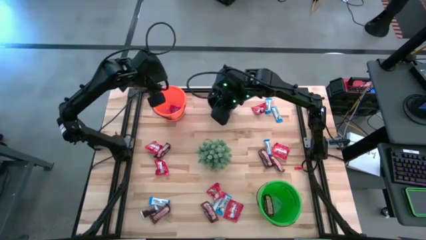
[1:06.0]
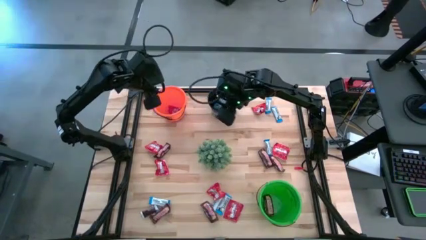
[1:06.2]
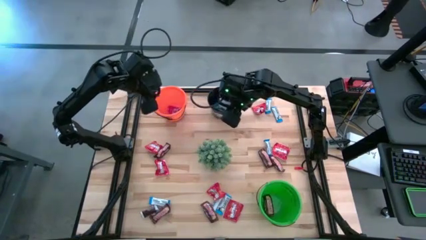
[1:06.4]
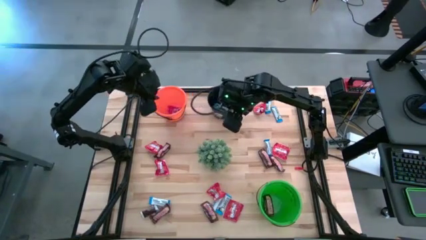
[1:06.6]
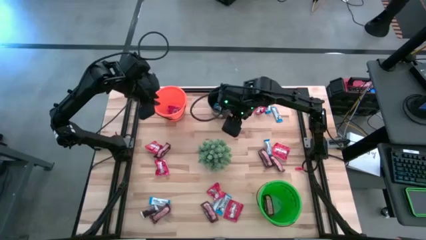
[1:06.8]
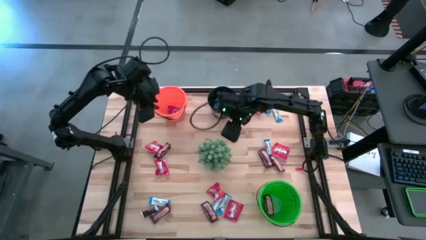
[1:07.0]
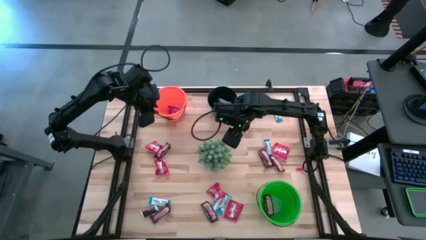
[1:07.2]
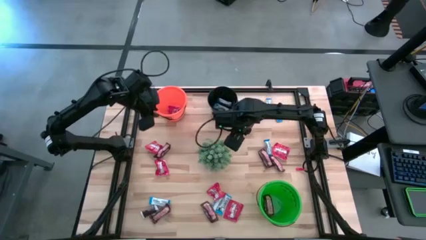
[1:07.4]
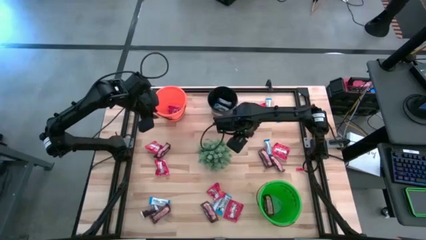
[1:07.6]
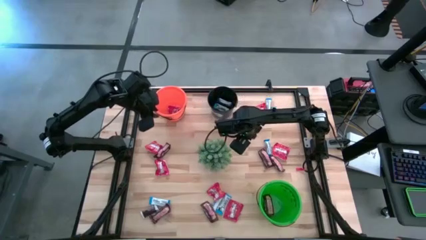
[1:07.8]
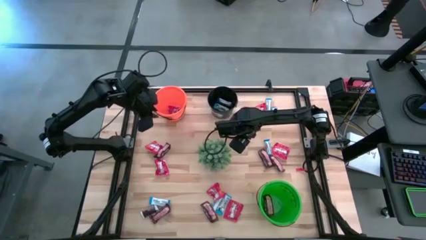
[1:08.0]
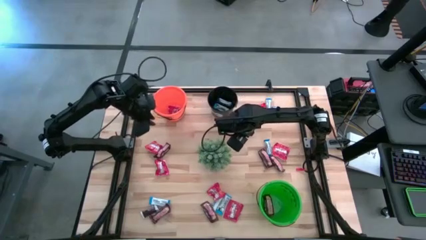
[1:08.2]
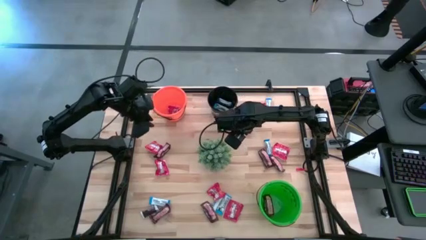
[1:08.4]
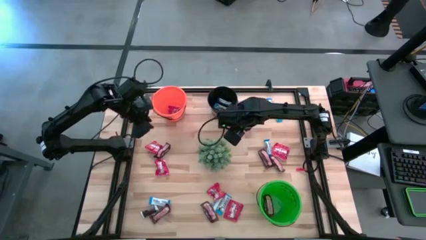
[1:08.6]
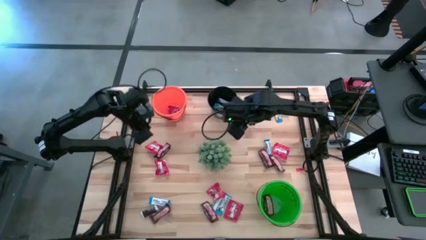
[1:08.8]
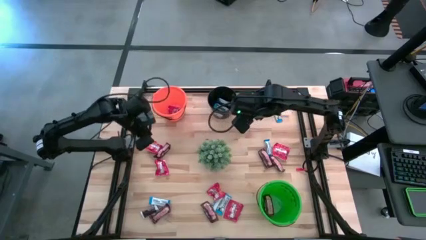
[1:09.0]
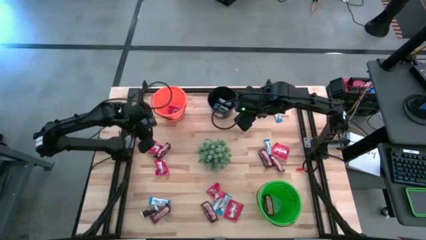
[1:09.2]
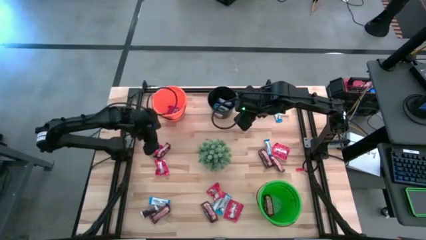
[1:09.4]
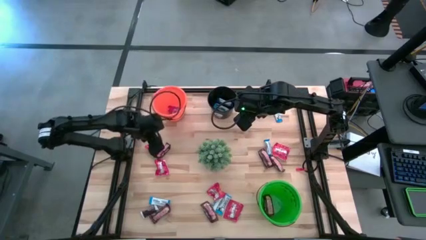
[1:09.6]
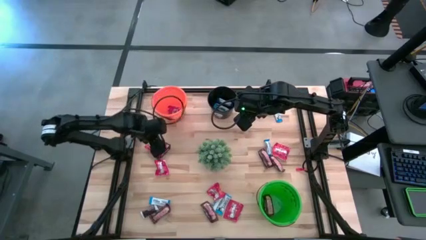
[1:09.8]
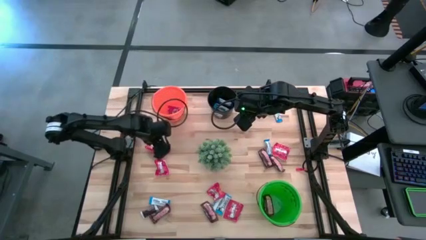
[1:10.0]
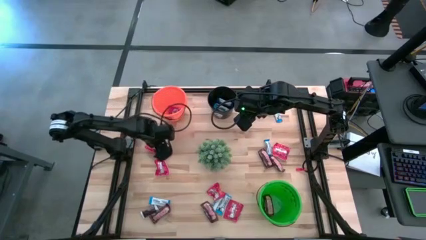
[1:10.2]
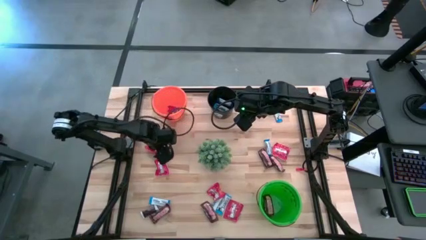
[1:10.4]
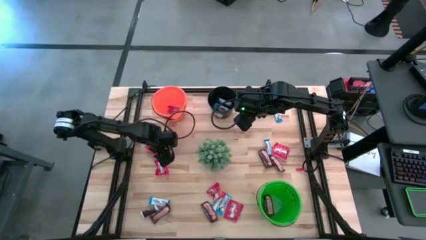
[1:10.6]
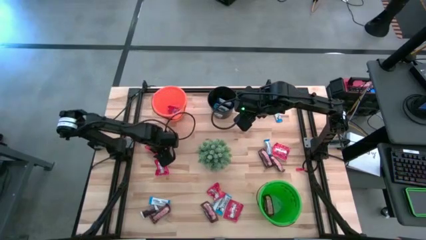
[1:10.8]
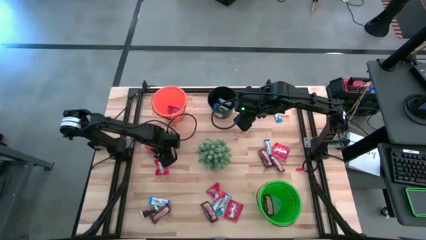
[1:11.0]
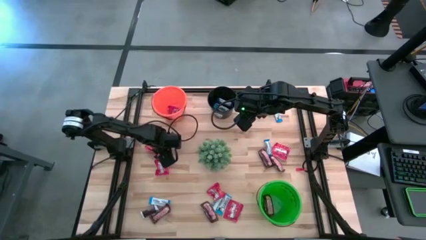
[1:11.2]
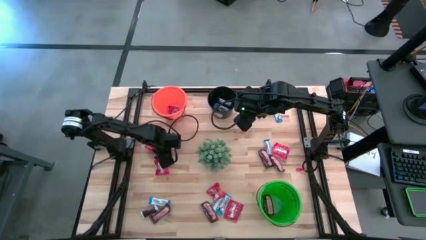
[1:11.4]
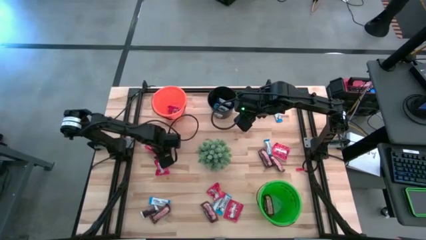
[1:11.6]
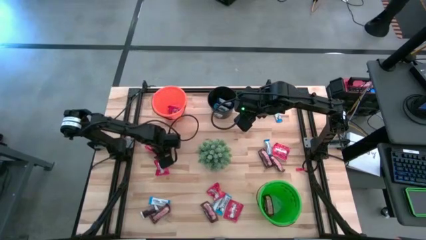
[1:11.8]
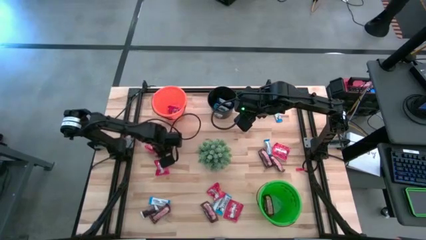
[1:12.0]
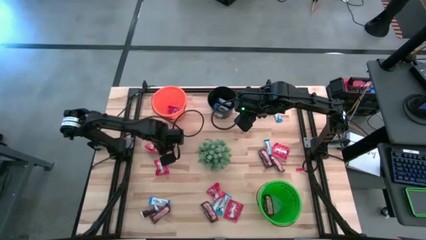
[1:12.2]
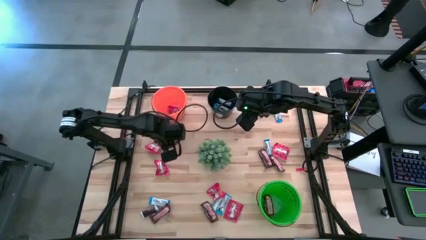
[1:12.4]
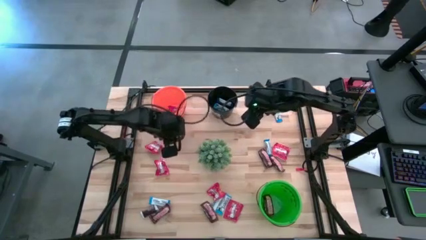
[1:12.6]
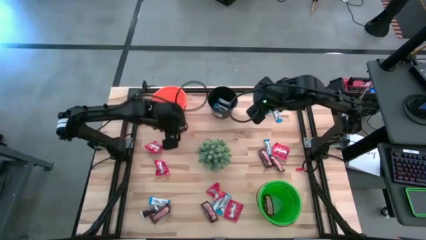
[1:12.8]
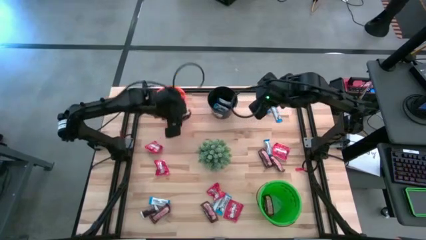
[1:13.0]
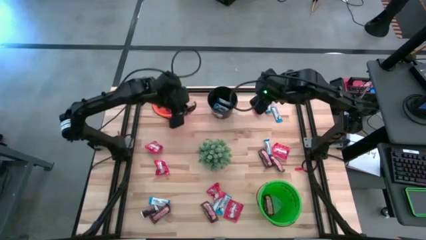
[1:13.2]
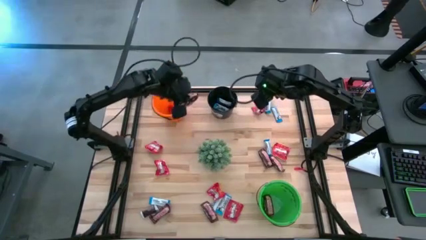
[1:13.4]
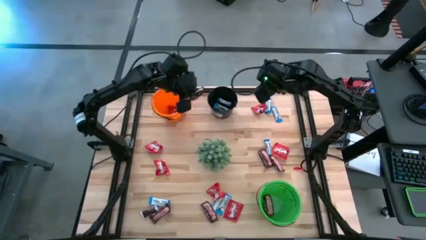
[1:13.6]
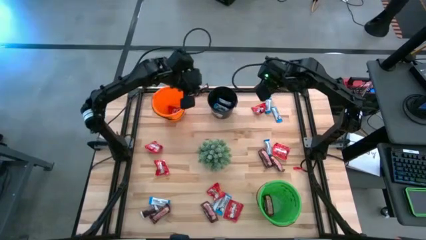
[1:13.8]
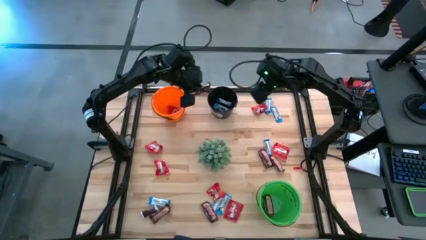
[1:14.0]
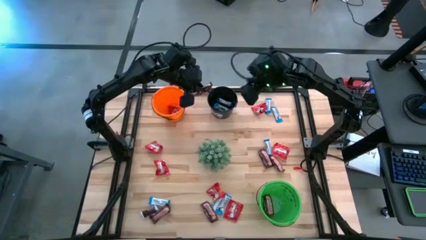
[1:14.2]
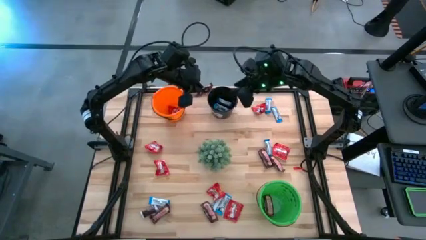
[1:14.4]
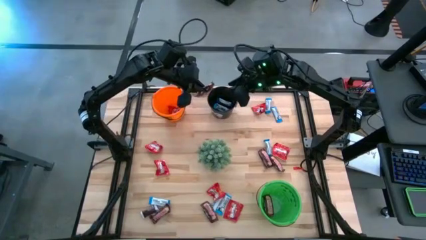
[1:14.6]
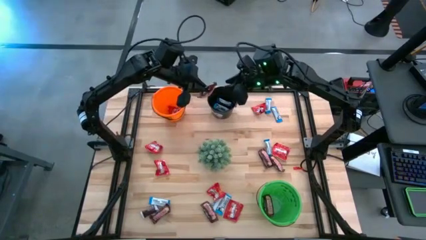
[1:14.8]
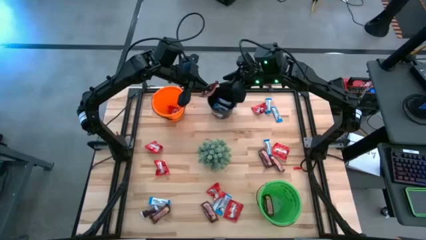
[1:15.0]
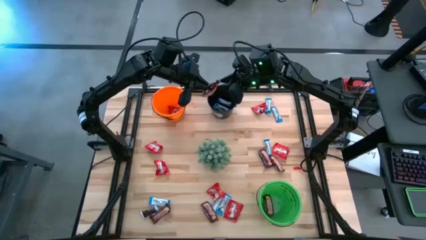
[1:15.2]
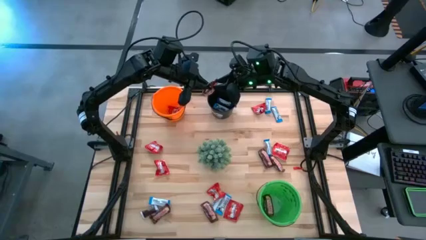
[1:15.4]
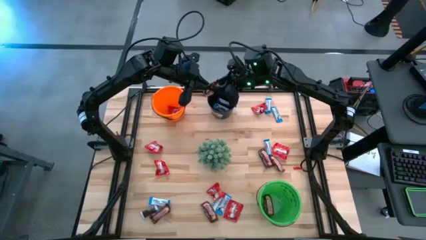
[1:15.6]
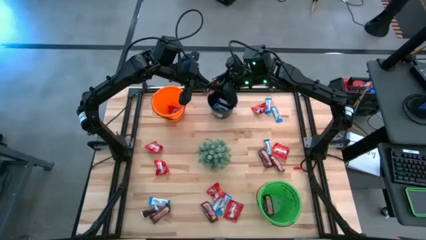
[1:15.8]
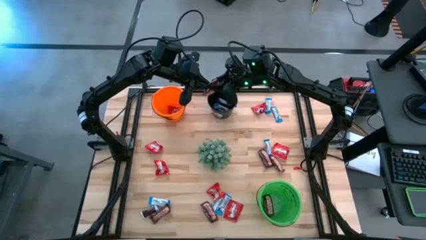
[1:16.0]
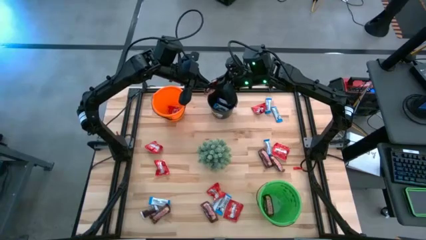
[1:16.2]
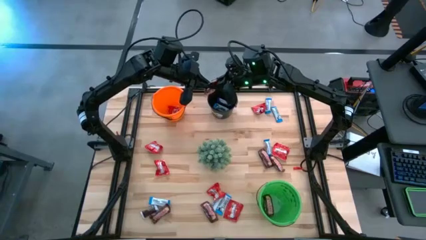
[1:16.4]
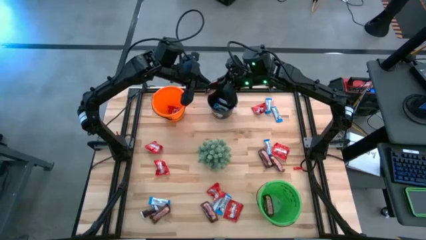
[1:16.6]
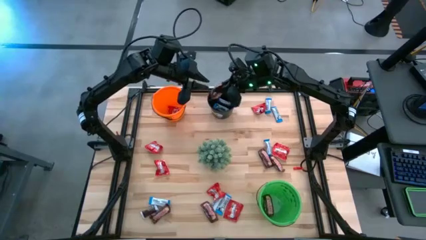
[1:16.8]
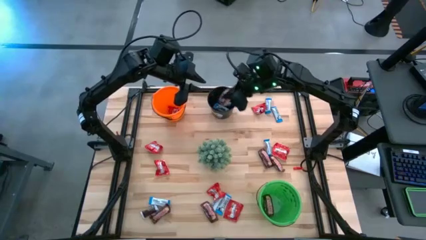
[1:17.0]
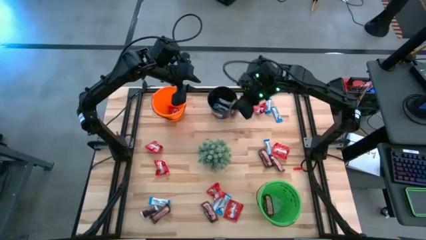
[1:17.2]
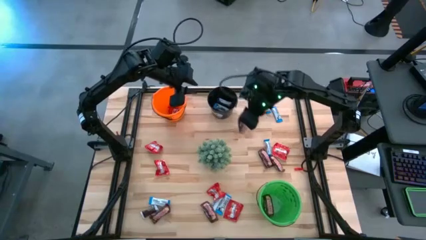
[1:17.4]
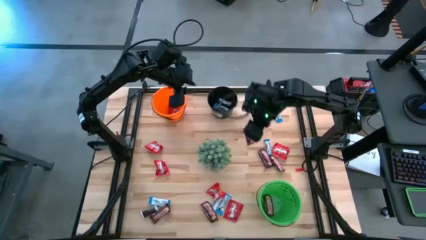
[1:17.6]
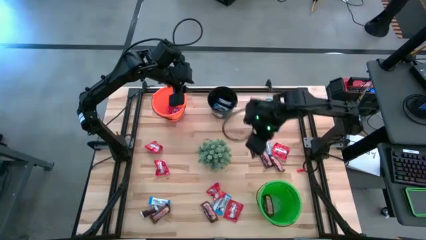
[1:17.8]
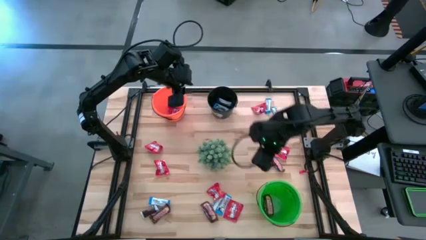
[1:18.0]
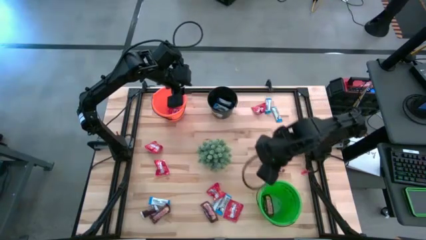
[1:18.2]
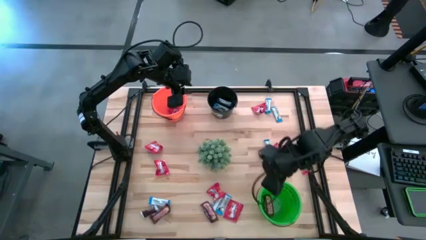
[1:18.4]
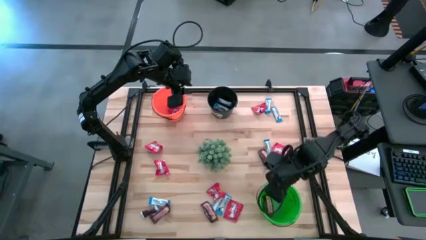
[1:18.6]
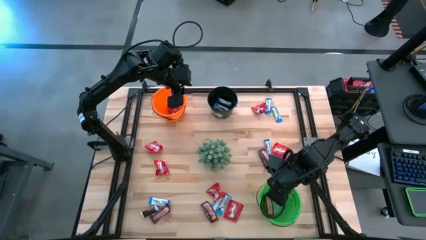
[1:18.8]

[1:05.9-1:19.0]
Task: Organize candy in baskets
Put the brown chocolate bar into the green bucket

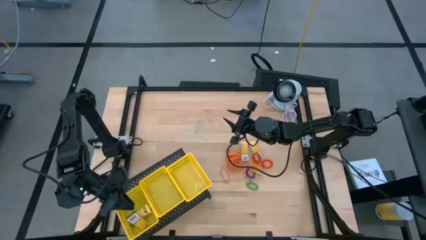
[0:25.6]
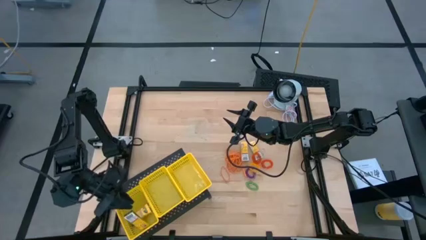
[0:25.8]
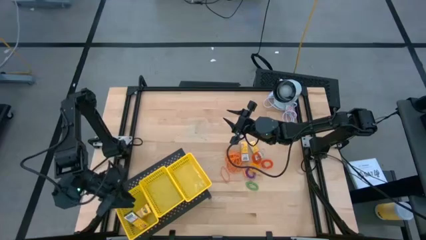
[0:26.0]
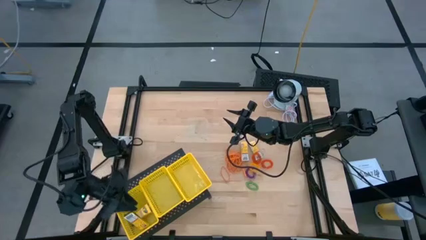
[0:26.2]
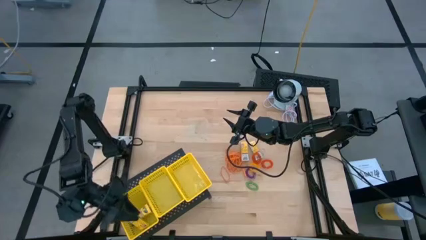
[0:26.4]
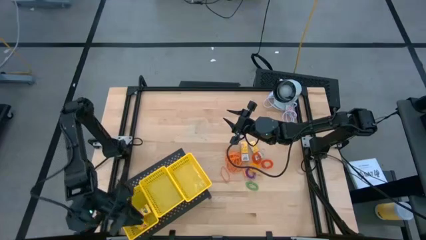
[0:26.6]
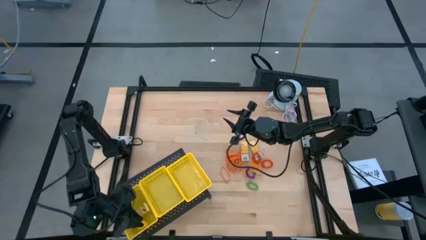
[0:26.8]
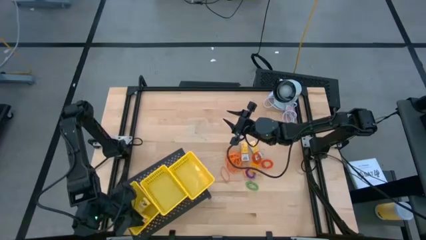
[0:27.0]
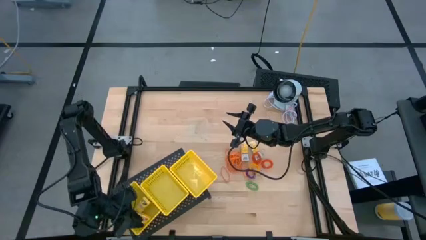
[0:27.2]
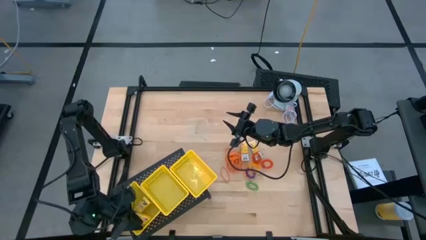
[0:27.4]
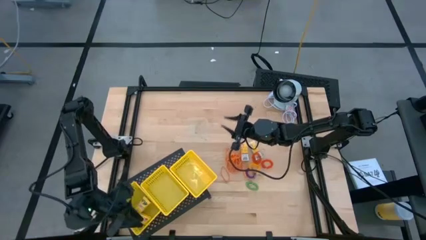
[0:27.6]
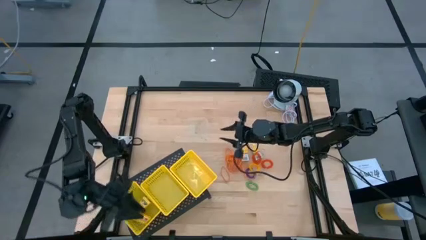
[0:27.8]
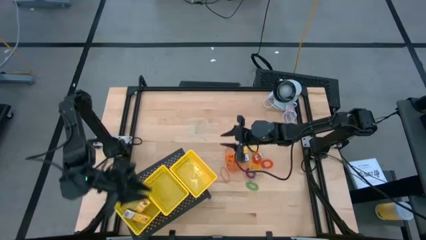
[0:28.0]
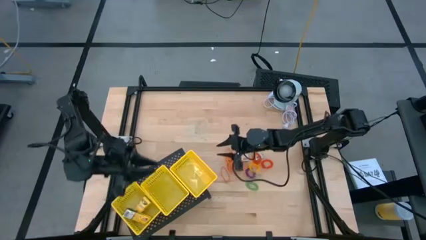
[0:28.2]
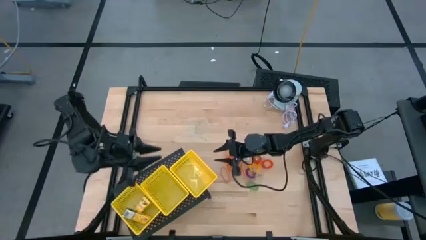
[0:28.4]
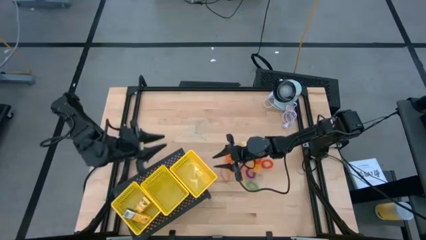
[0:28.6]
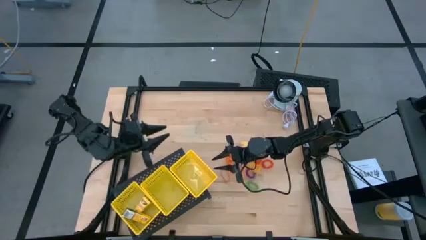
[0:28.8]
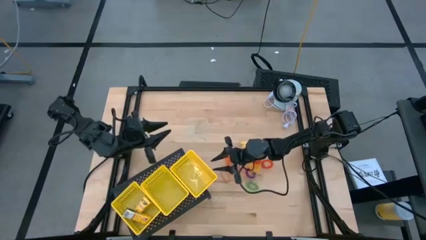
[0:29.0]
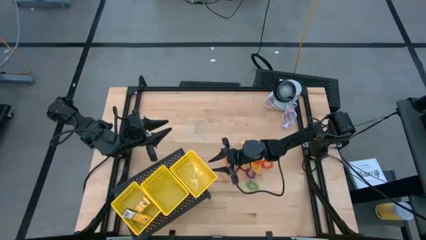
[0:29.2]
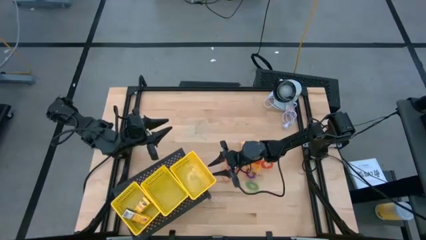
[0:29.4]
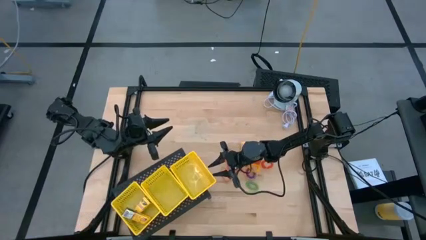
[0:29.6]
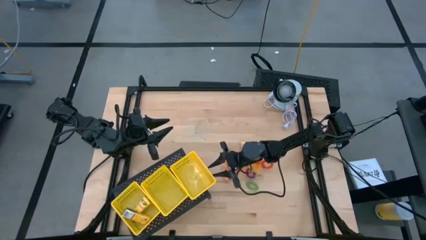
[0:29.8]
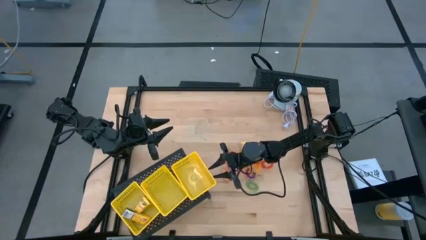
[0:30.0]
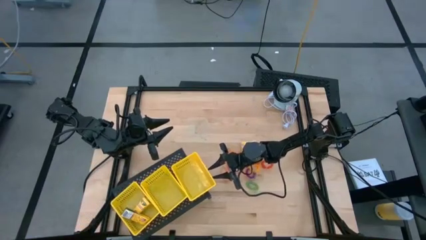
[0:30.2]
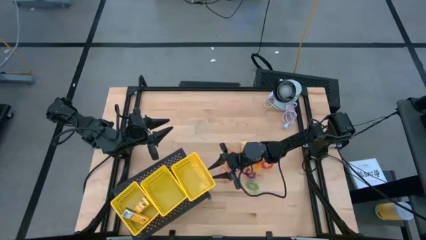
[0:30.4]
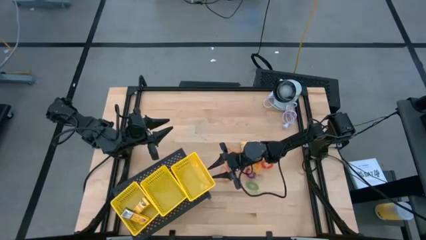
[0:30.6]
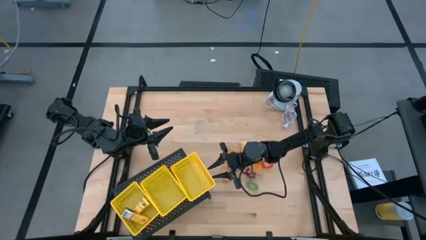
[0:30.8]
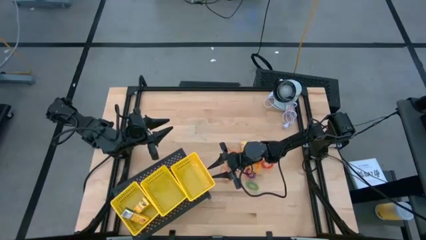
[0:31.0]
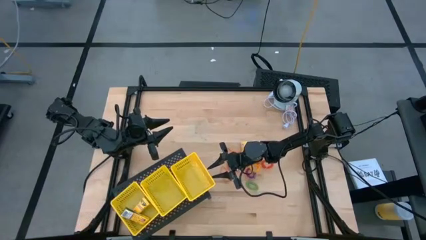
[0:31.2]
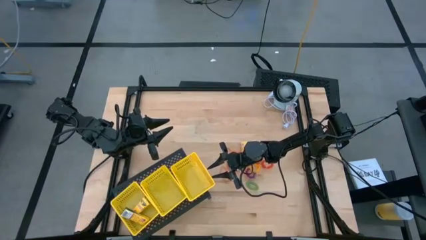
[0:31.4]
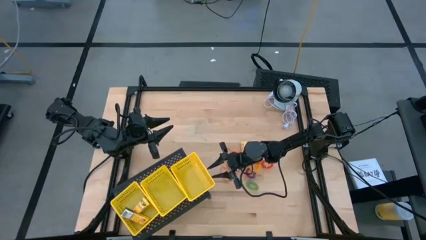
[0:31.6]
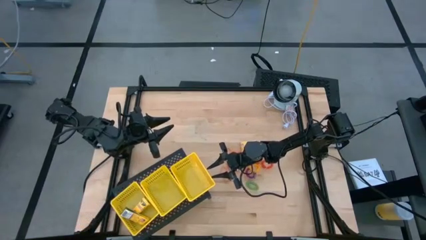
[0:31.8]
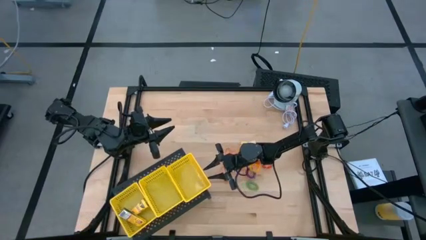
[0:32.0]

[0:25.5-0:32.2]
Task: Pick & Place Office Desk Supplies
Put the crayon box into the left yellow bin on the shelf
